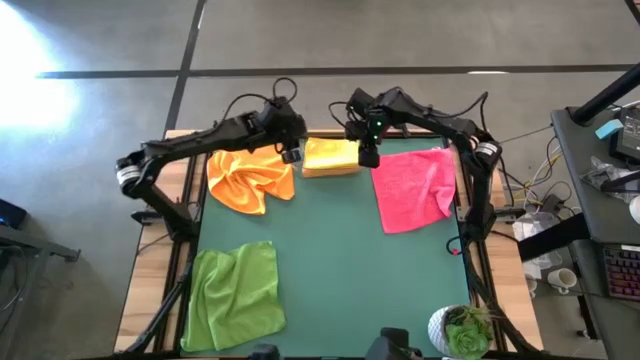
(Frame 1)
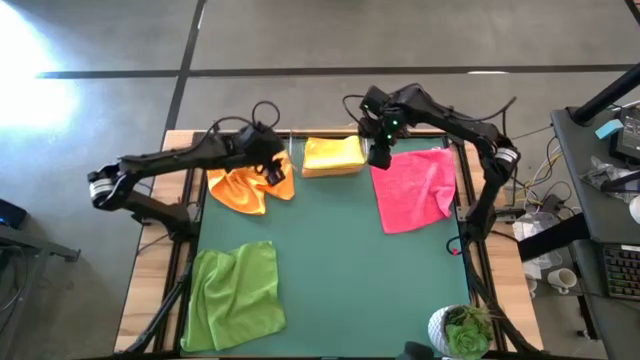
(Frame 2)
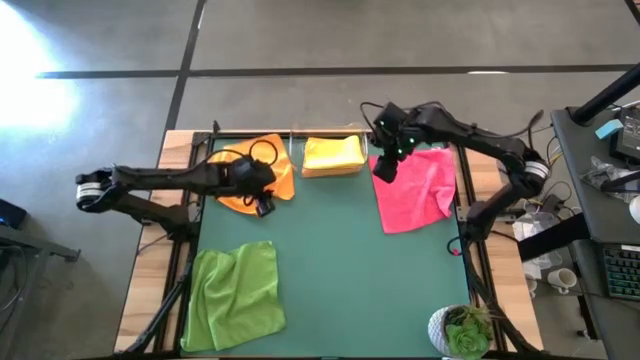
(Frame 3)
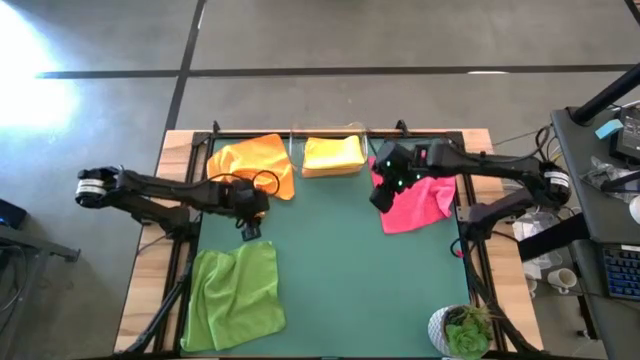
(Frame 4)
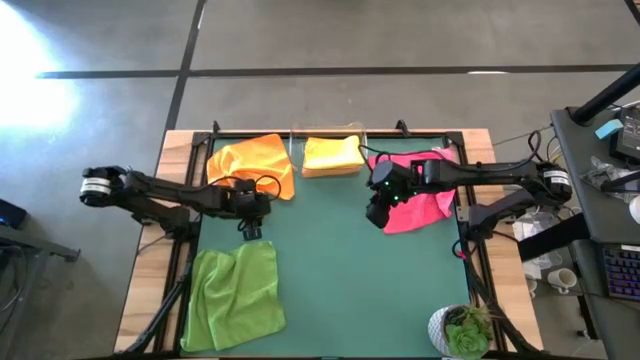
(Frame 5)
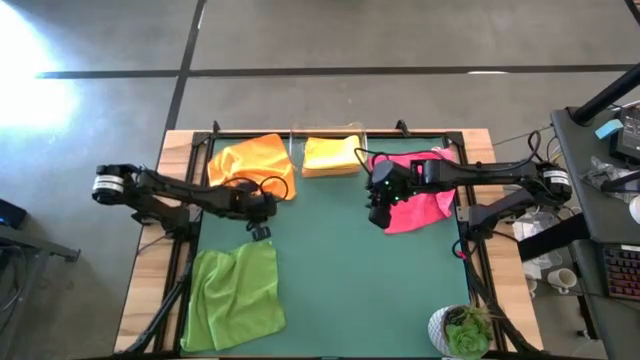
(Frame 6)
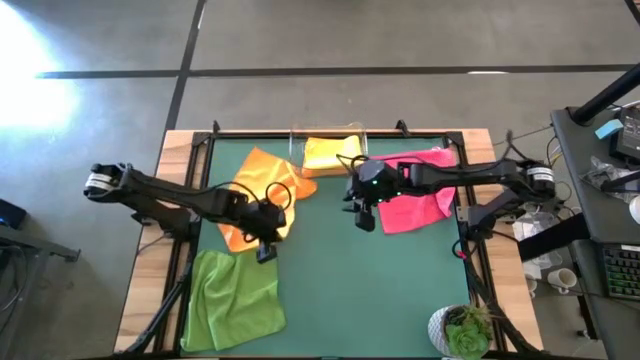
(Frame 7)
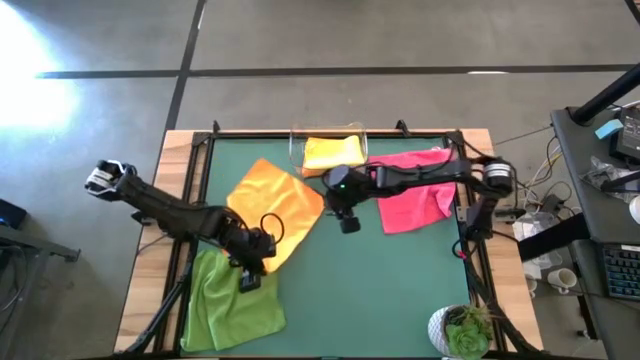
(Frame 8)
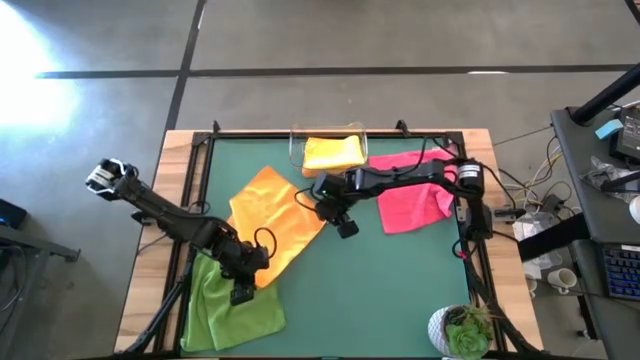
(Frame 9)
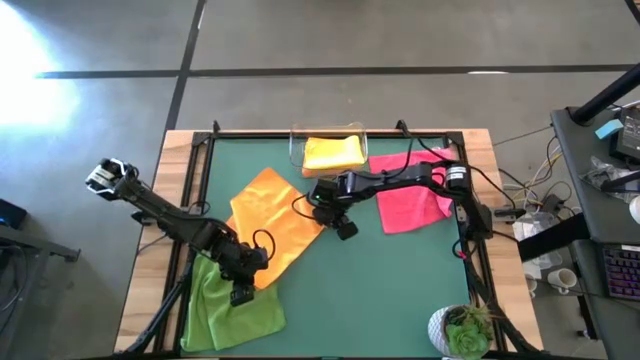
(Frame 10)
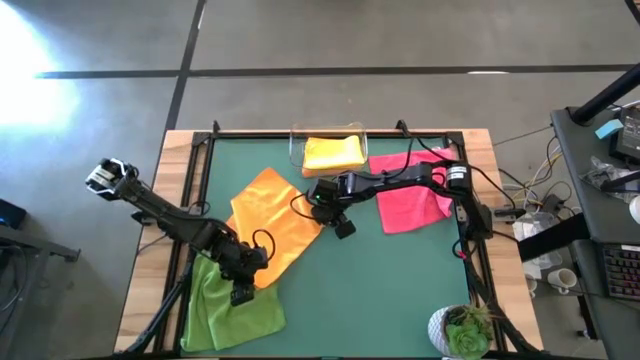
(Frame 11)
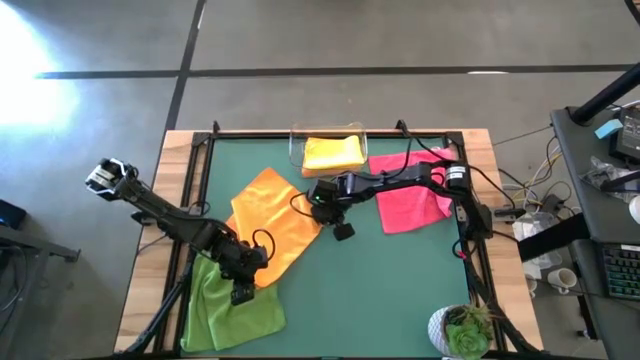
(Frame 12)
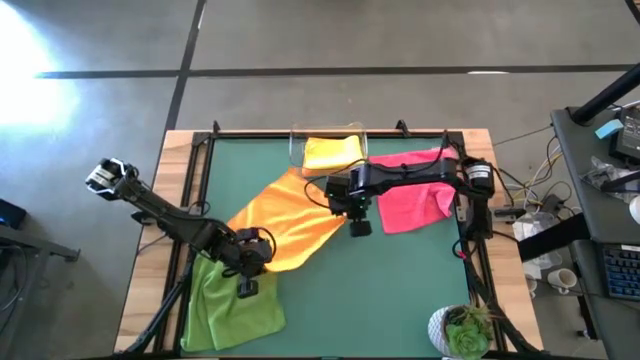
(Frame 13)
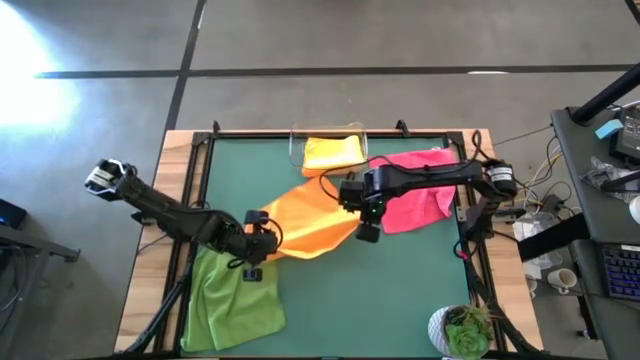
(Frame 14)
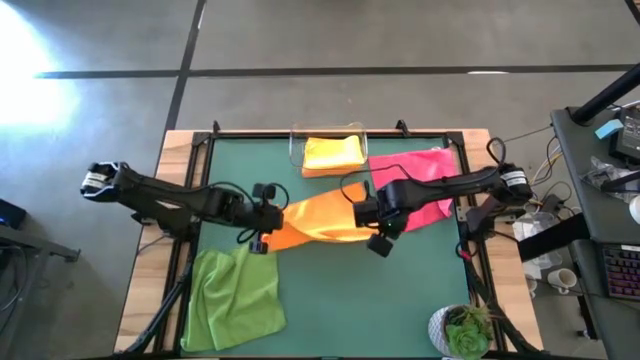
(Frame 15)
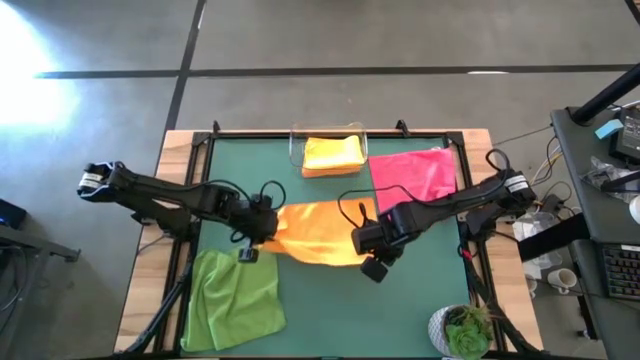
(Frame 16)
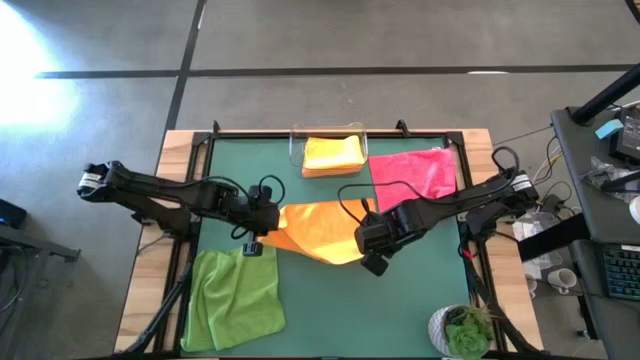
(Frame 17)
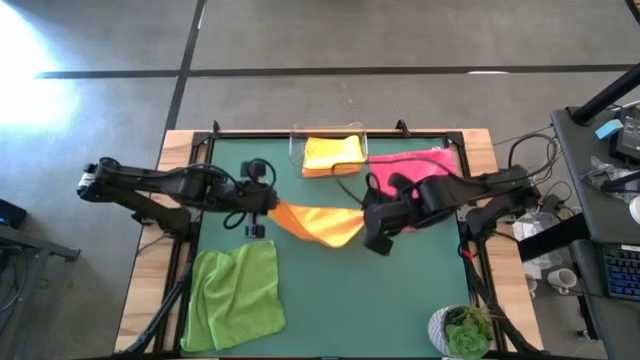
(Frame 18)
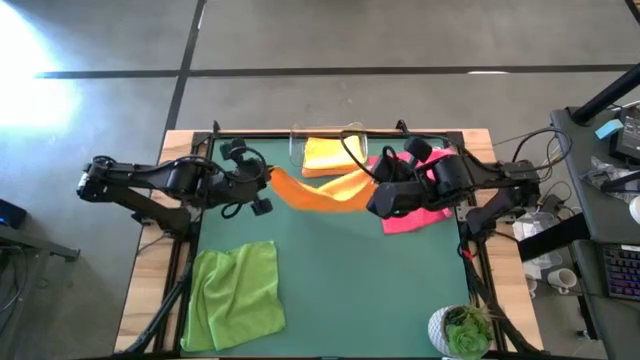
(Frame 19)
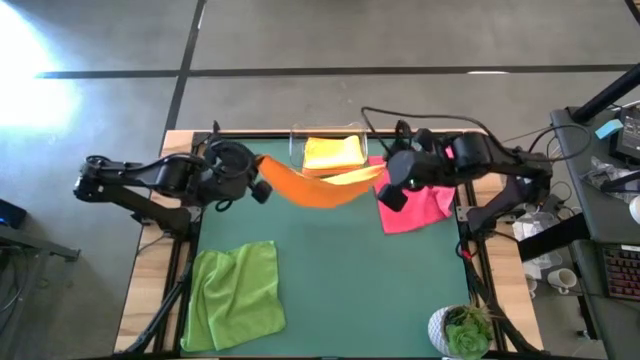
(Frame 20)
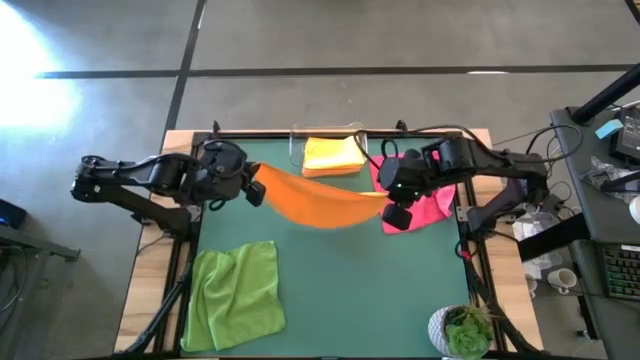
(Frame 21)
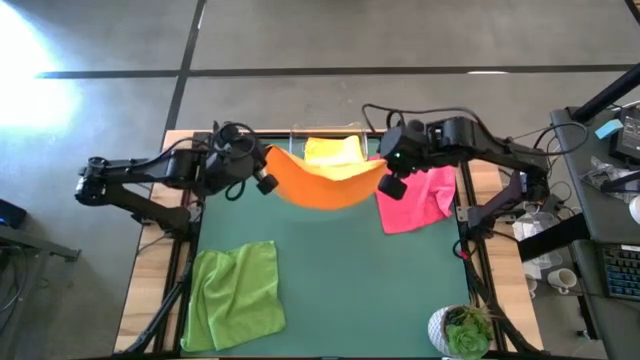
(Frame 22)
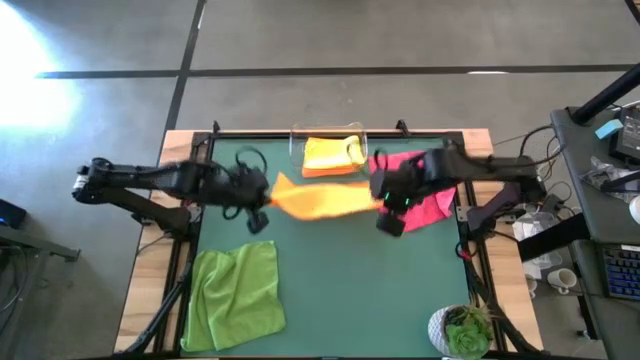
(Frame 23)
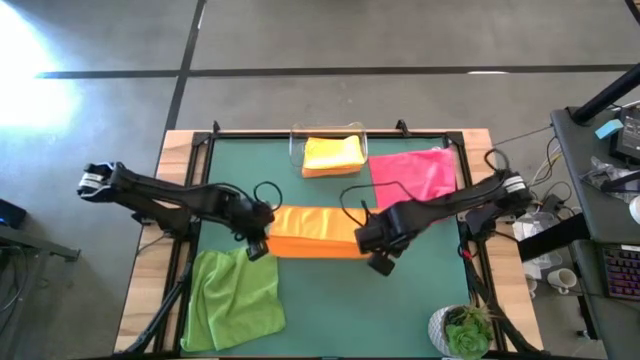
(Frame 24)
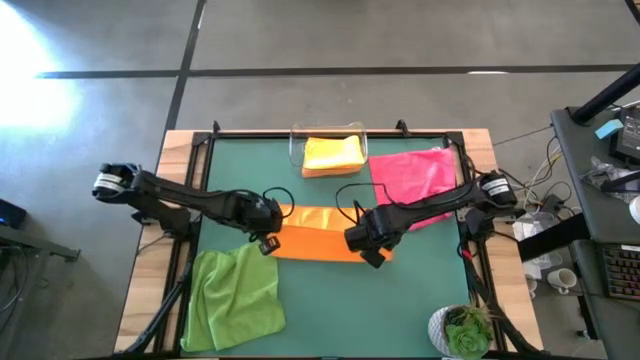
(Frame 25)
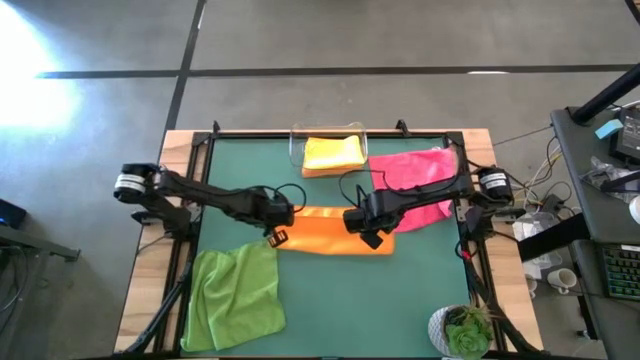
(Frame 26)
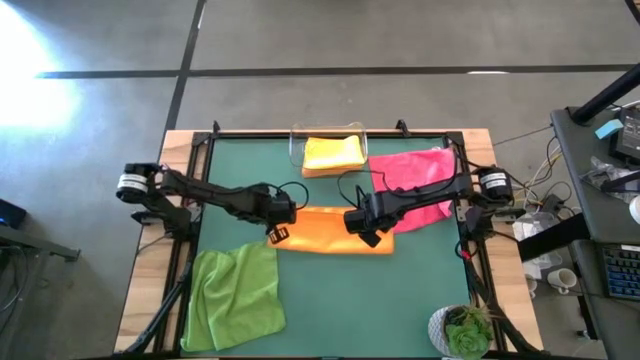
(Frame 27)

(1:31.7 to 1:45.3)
Task: Fold microfiber towels
Fold the orange microfiber cloth

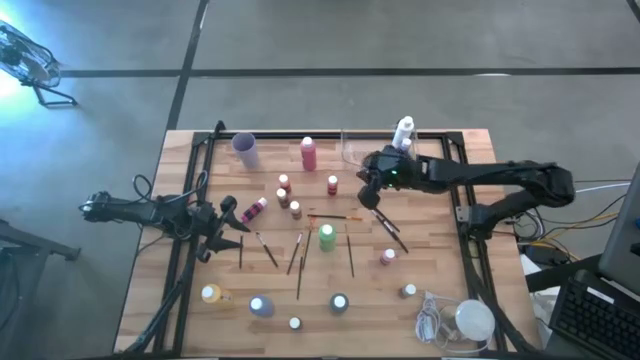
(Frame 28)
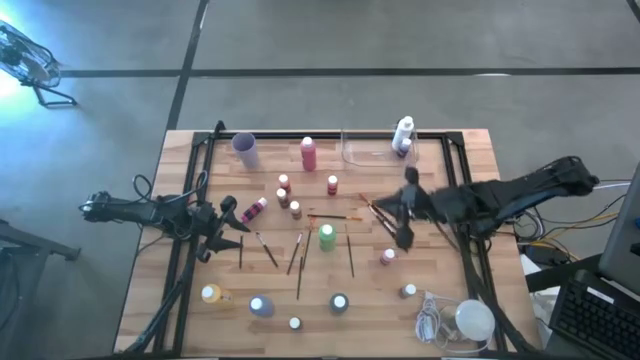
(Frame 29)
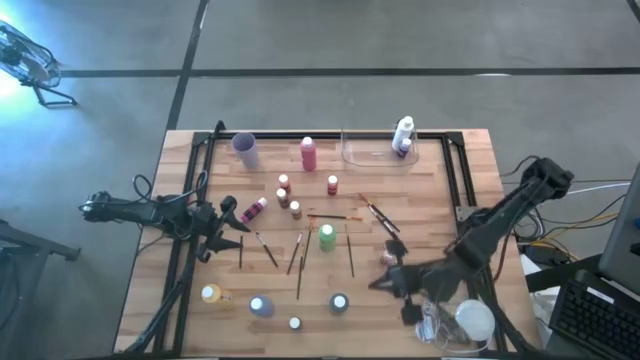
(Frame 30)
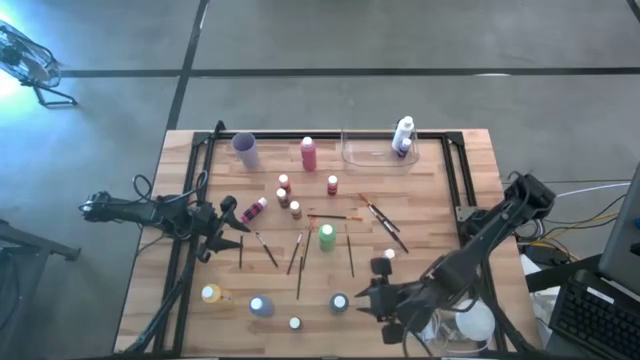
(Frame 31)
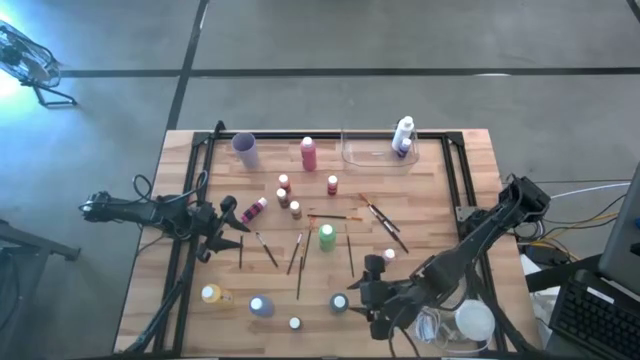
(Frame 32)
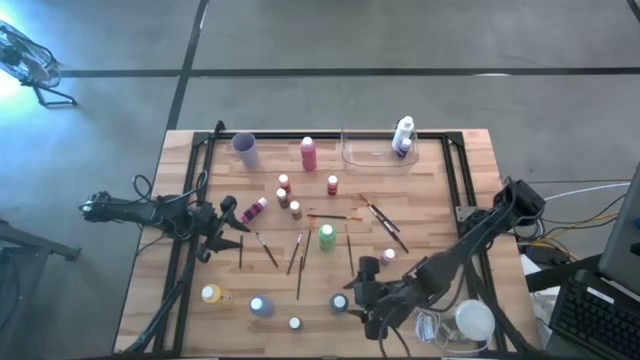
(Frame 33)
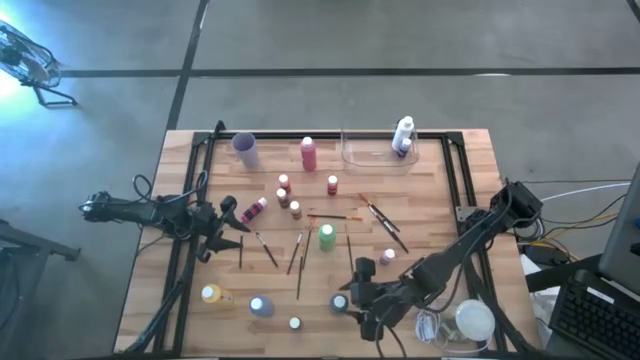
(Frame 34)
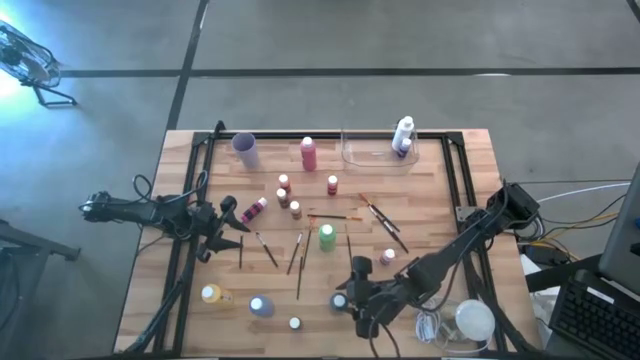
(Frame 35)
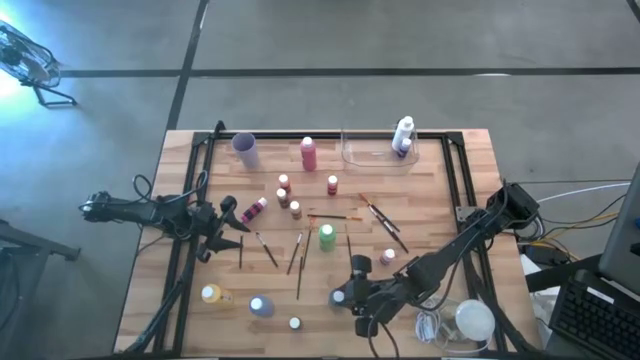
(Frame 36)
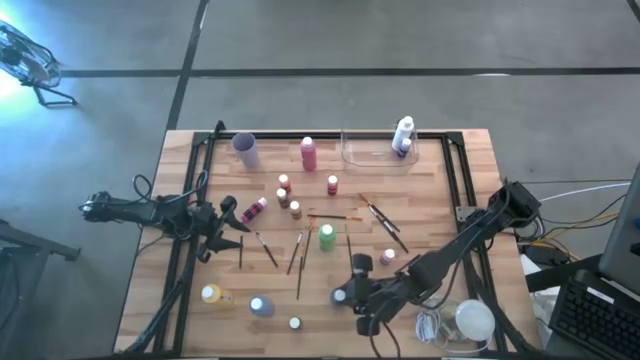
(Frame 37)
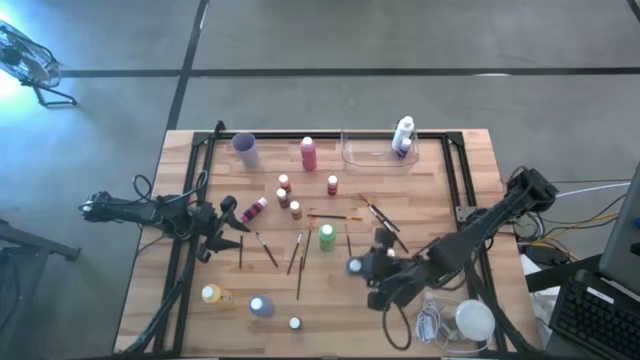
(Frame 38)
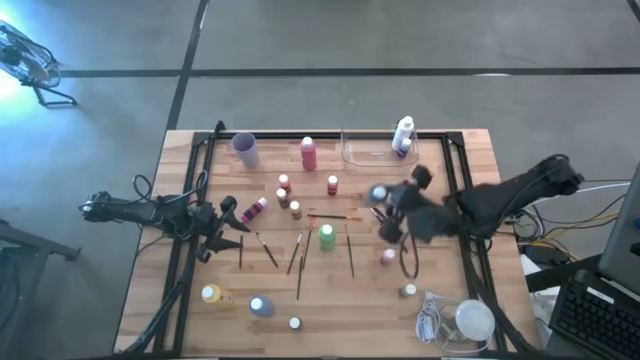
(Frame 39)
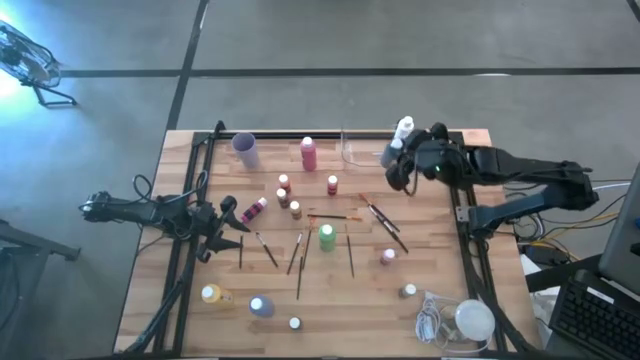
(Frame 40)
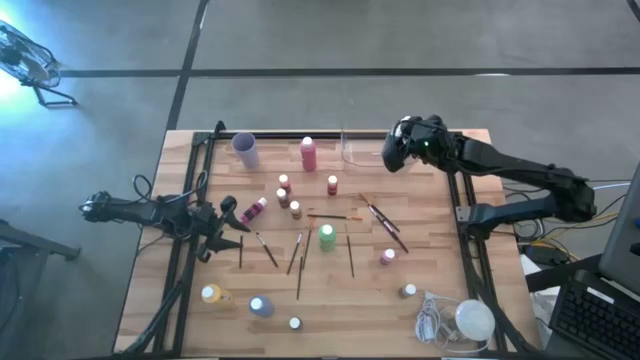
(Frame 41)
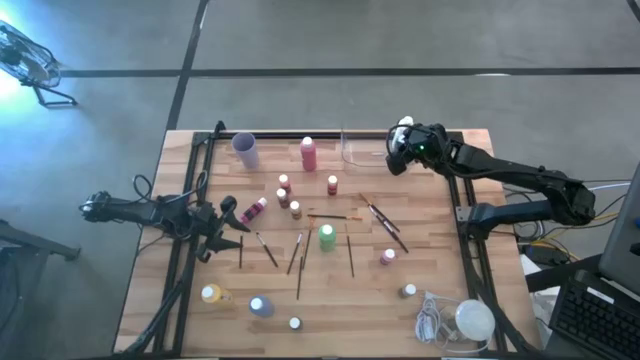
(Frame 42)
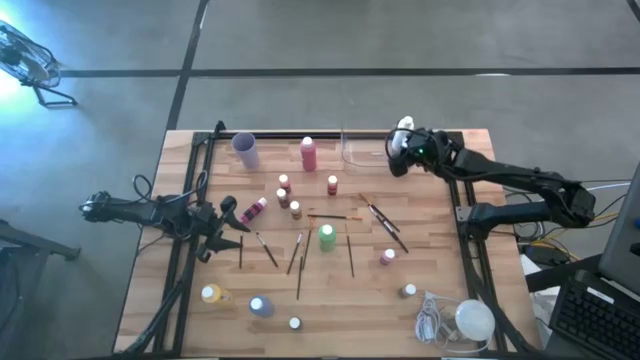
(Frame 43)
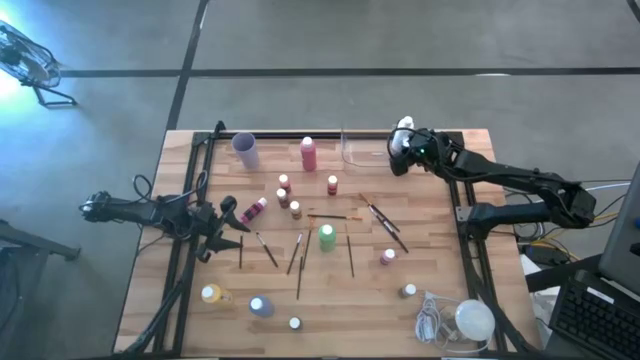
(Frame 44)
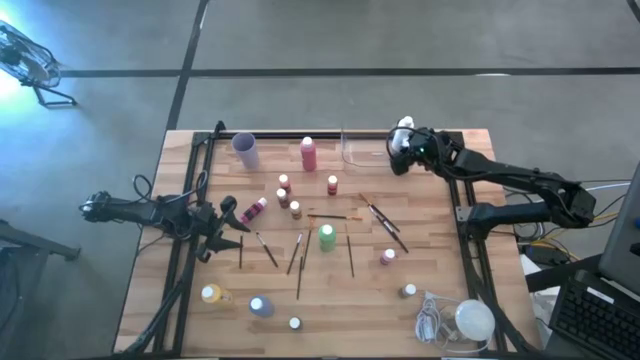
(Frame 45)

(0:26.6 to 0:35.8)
Task: Pick & Place Paint Supplies
Put the blue paint bottle into the transparent bin
